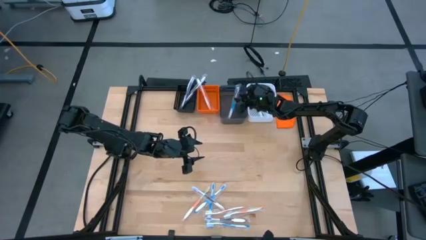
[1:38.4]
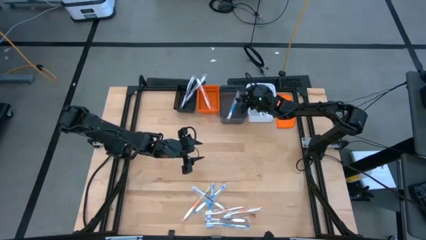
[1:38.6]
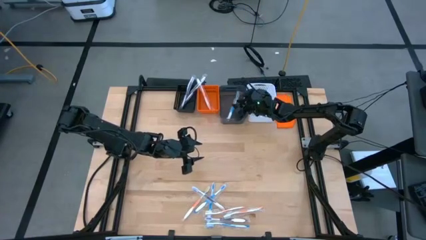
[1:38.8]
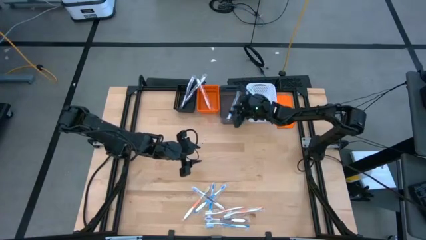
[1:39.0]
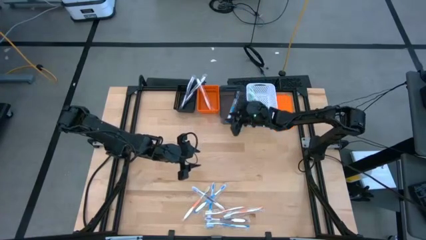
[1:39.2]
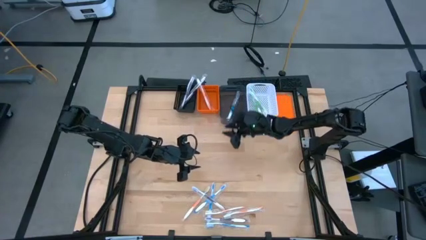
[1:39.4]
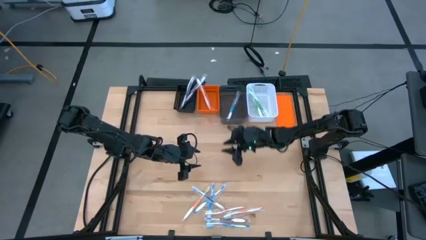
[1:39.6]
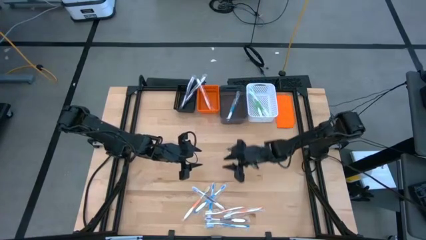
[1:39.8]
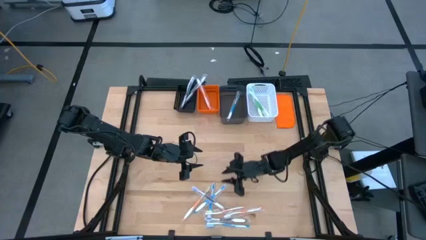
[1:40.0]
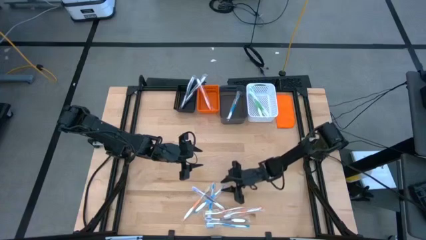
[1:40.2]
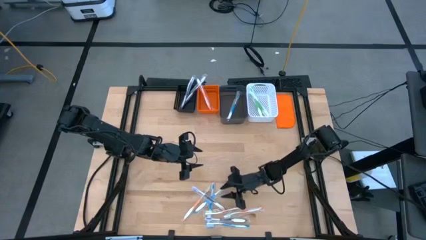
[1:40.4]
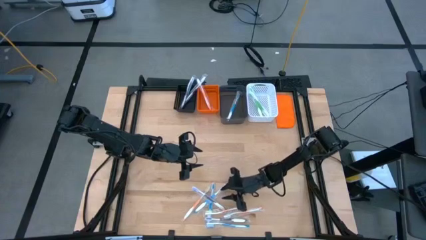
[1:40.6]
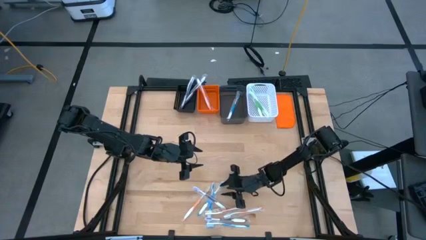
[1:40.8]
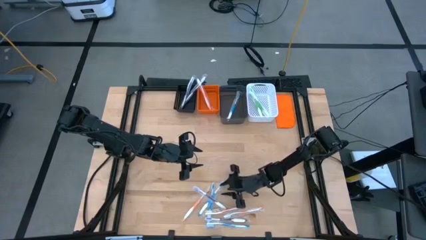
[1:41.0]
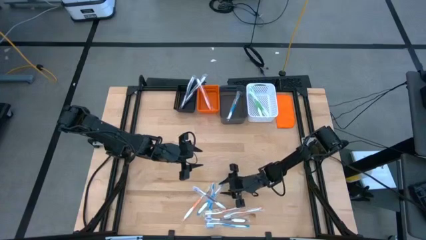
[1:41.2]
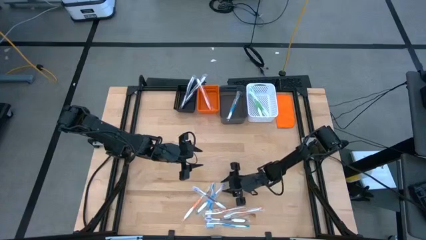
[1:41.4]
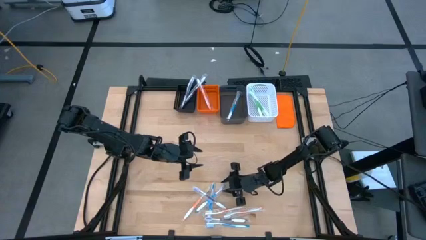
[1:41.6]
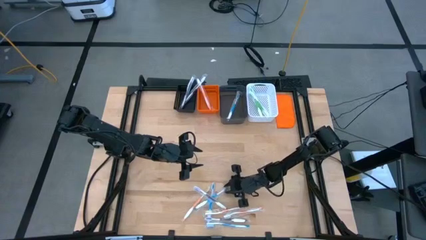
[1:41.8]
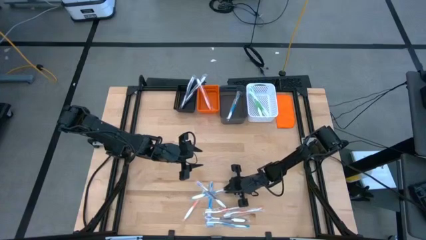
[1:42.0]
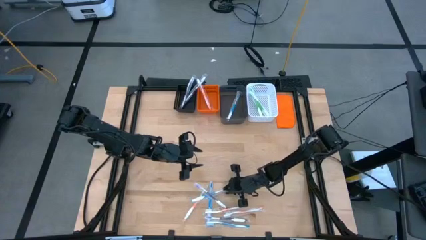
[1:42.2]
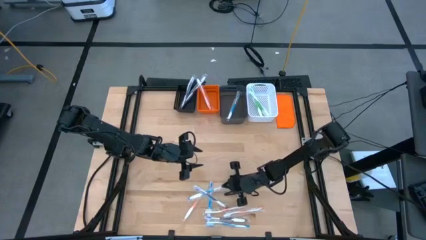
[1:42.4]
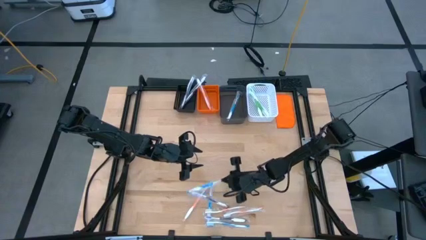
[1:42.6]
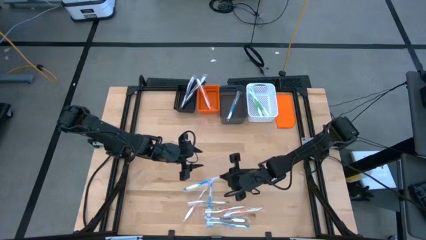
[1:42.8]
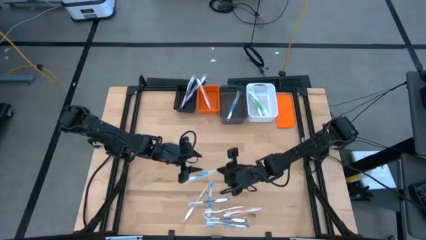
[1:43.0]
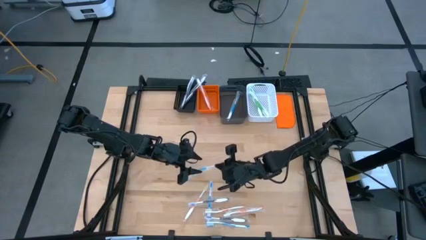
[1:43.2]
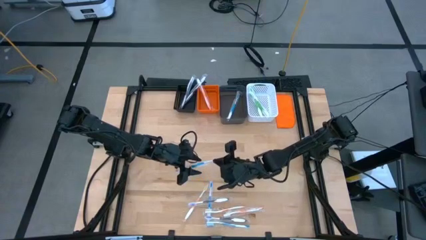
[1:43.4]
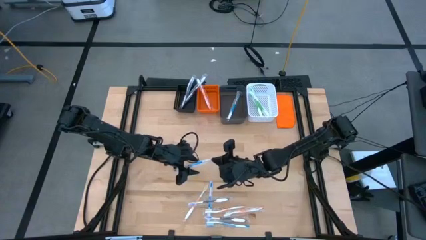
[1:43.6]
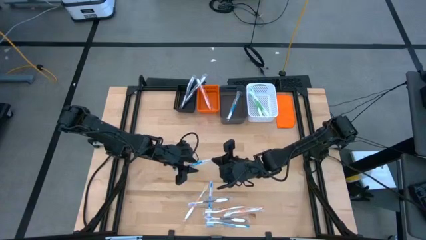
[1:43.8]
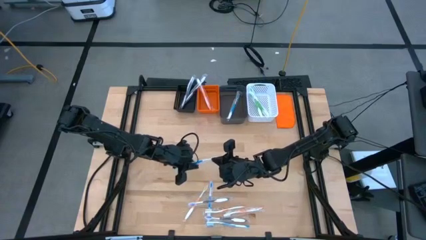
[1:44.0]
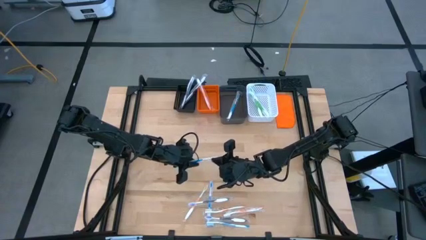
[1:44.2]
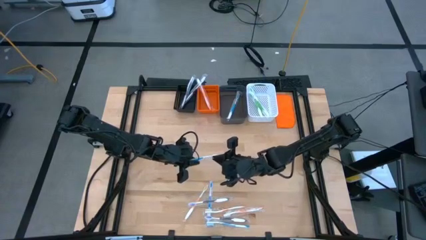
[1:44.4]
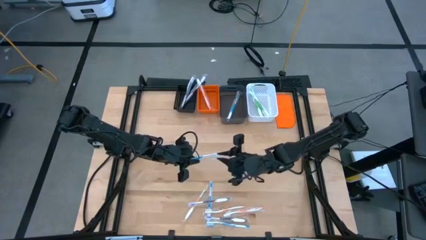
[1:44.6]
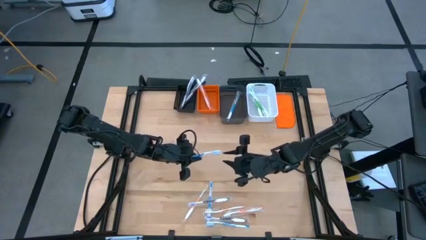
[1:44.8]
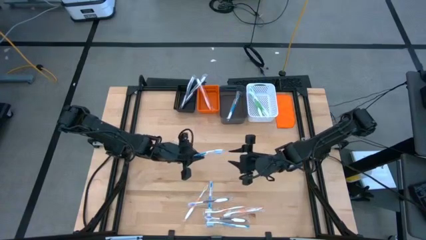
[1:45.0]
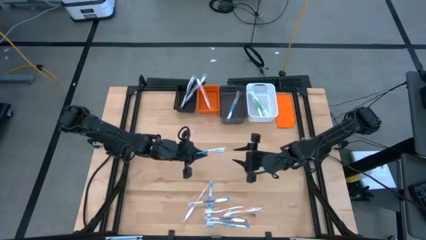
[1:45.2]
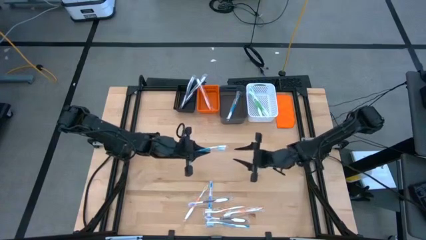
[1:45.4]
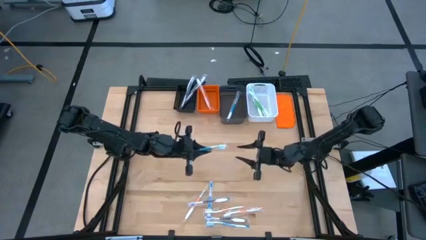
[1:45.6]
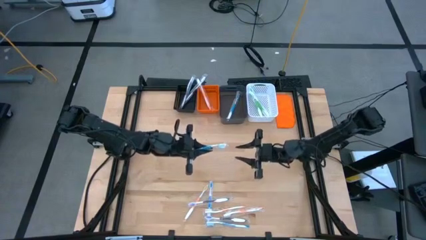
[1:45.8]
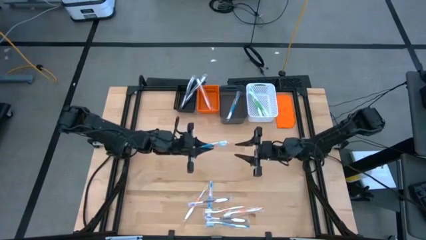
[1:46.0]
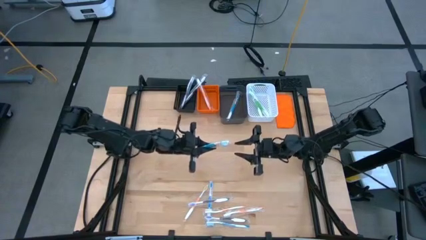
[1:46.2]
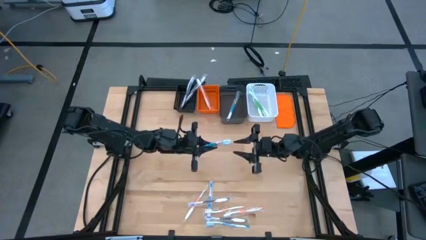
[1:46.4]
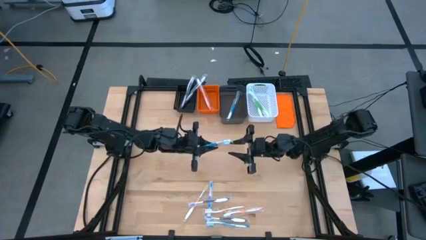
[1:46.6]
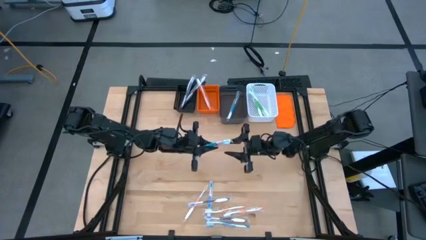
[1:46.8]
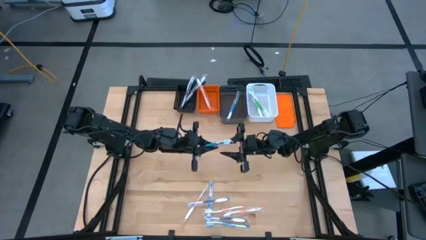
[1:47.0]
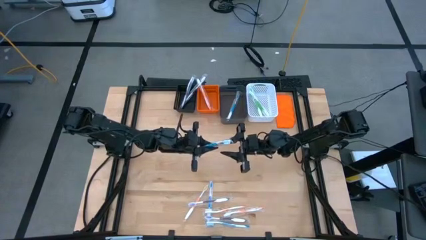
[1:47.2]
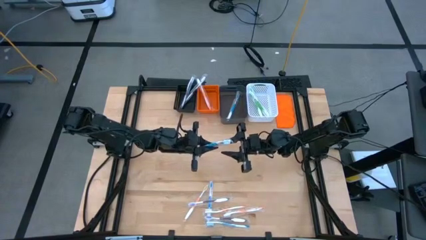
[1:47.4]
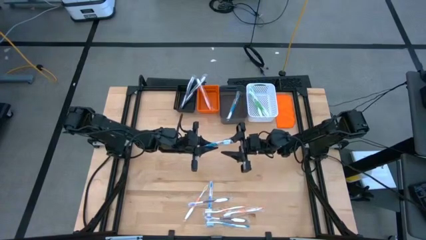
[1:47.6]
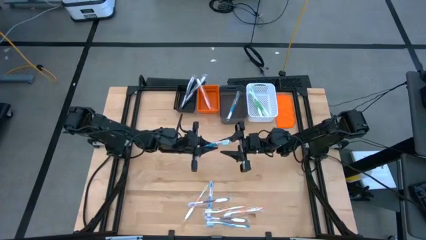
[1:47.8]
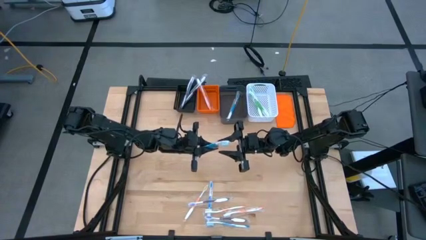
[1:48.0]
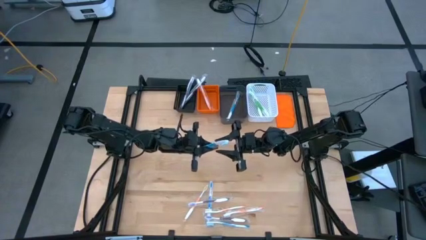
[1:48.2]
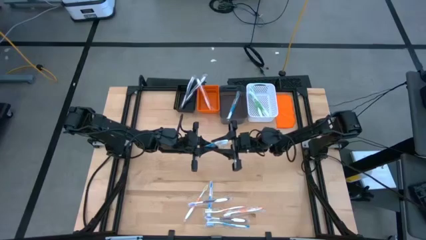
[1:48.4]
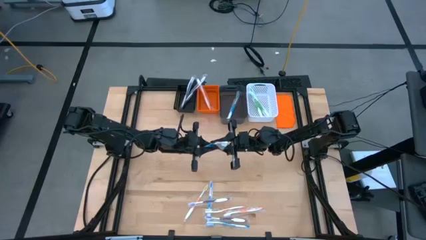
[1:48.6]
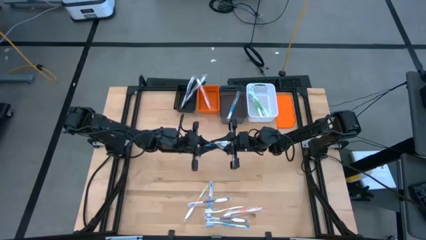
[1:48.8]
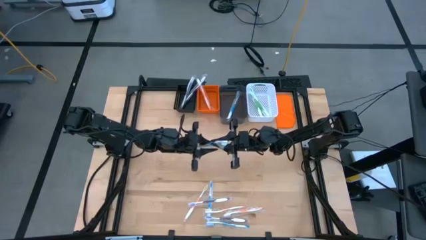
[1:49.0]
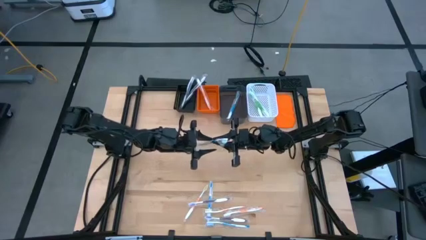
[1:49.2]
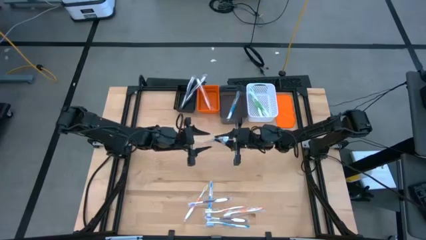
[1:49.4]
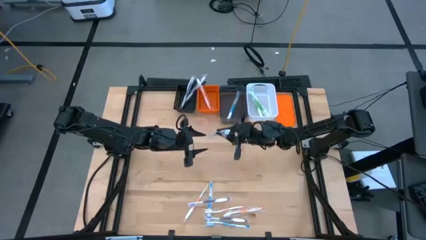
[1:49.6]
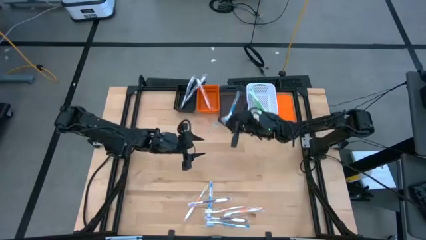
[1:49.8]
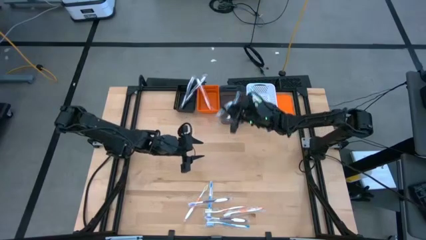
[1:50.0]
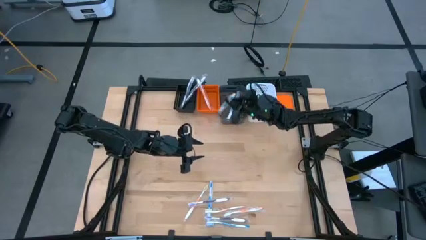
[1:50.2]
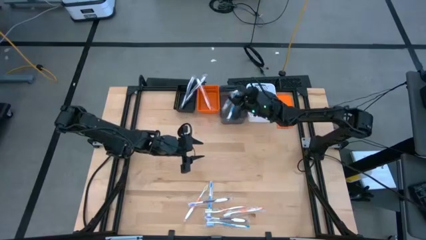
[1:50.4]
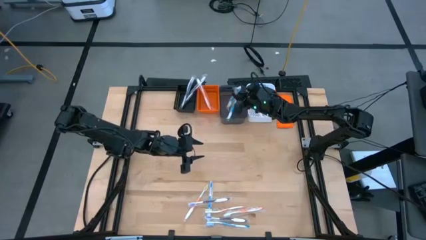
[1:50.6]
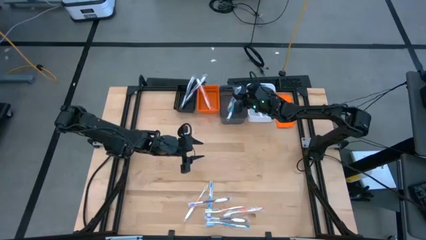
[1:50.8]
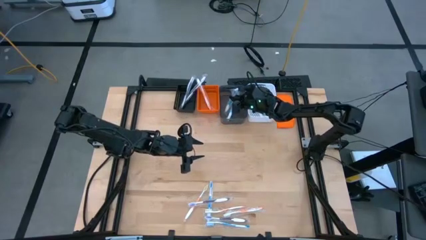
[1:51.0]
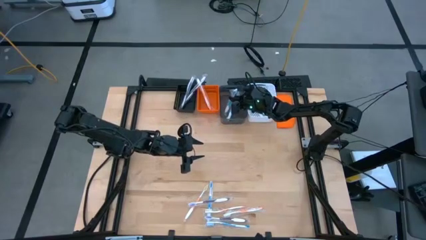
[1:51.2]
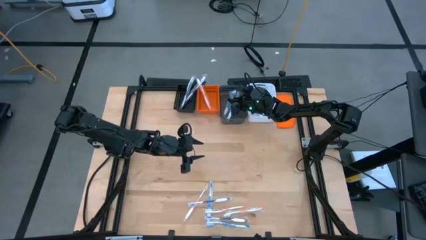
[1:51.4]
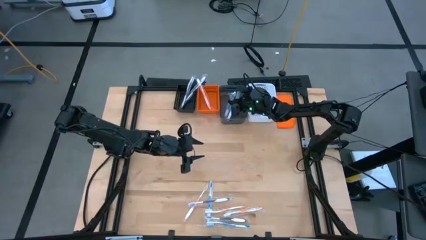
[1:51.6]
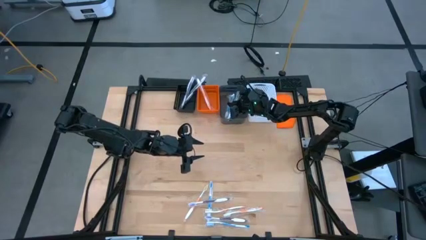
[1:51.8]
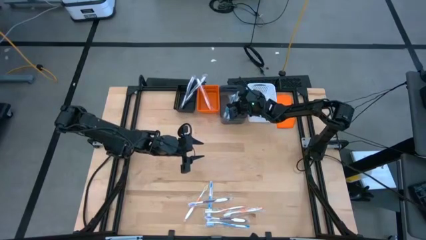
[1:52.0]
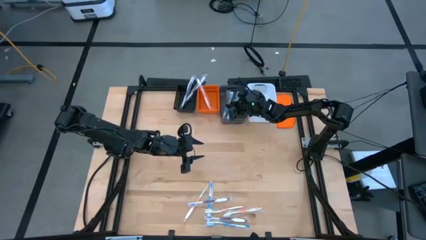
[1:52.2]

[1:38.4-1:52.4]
Task: Pick & Place Toothbrushes
Put the blue toothbrush into the black bin

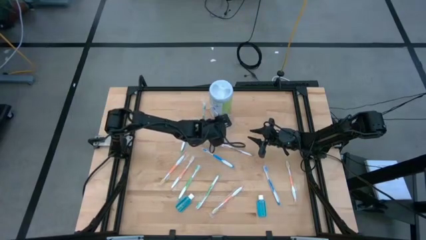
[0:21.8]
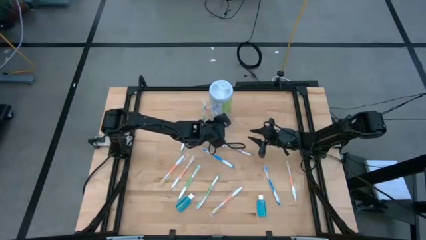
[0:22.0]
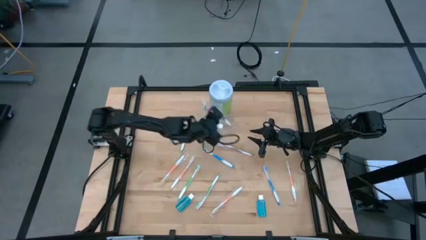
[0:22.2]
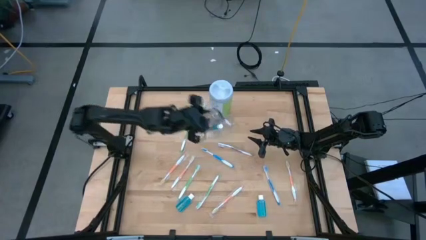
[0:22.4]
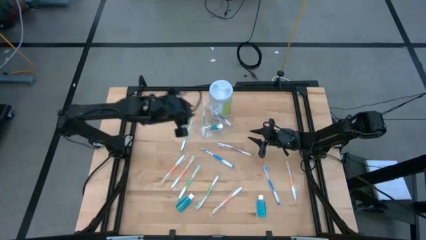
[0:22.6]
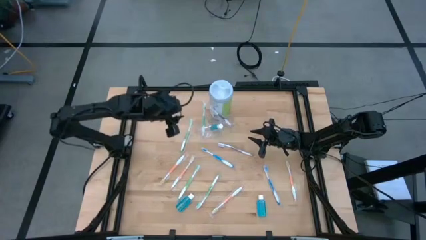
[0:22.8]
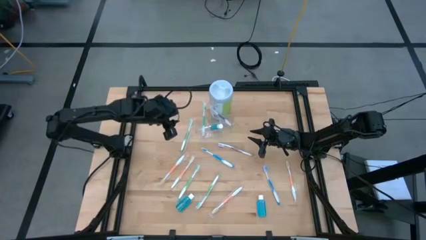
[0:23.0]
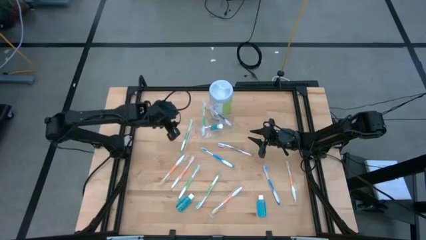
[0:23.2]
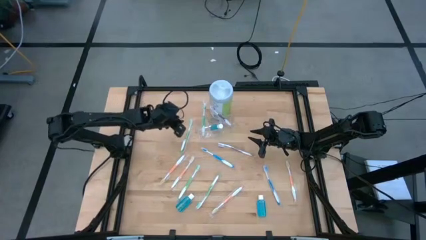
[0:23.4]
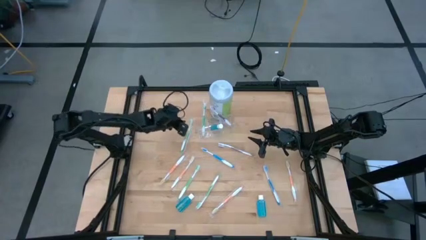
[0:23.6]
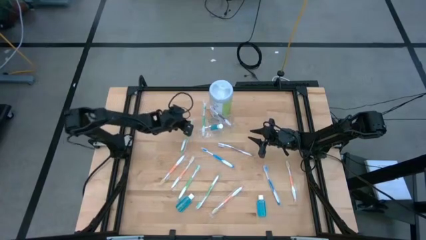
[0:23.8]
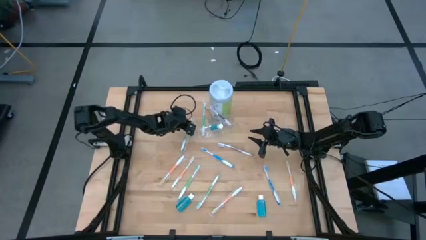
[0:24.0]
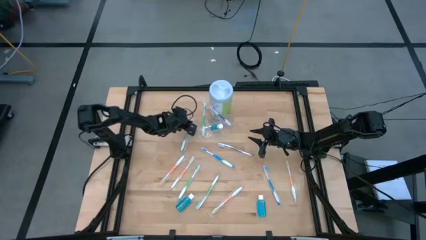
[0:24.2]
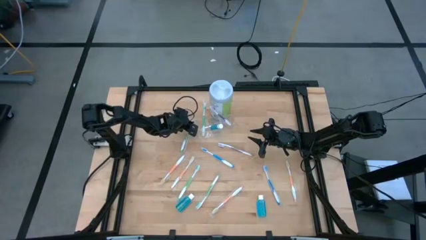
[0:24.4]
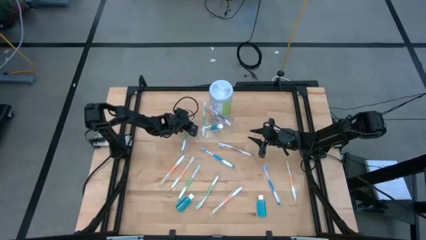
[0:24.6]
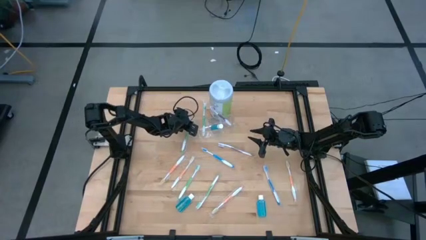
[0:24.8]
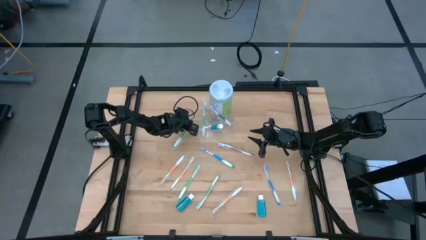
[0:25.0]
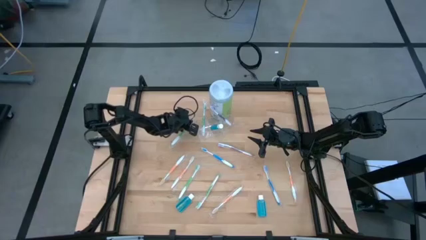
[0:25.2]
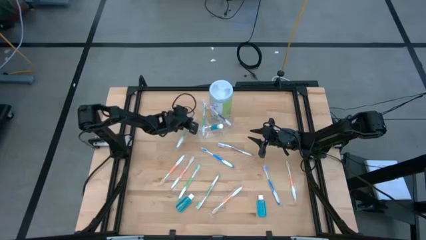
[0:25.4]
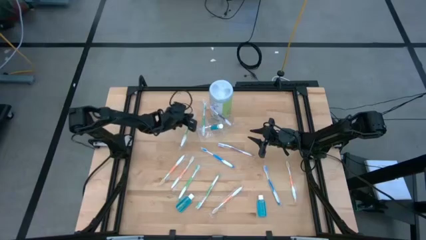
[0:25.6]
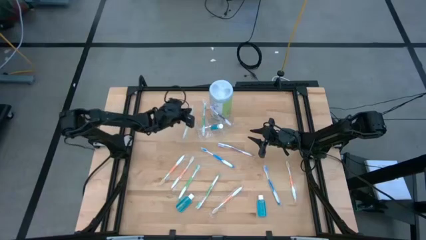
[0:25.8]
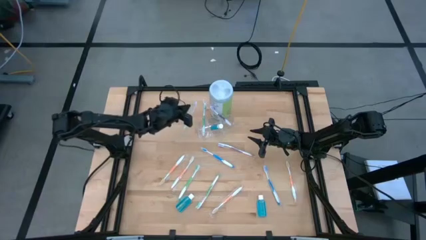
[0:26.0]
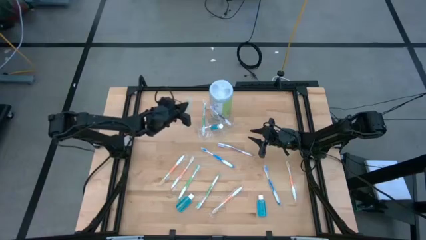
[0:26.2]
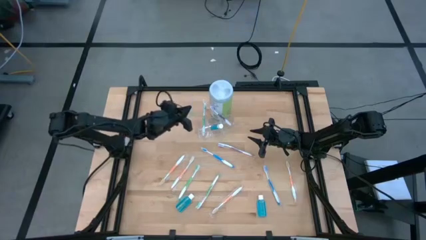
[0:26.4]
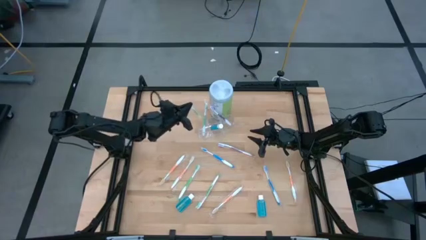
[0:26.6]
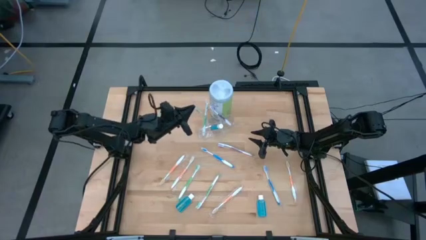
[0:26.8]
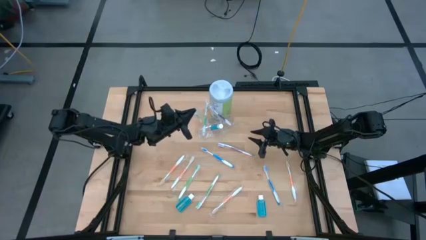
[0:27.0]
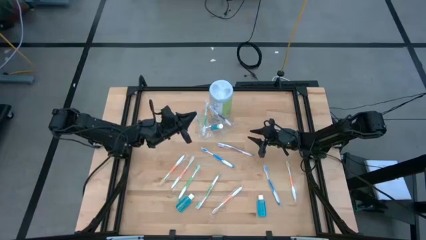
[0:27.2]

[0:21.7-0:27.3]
Task: Pick & Place toothbrushing station
Put the green toothbrush into the transparent organizer
